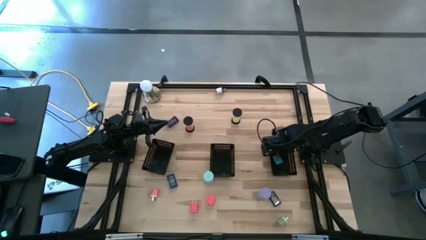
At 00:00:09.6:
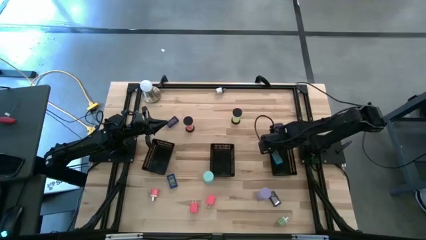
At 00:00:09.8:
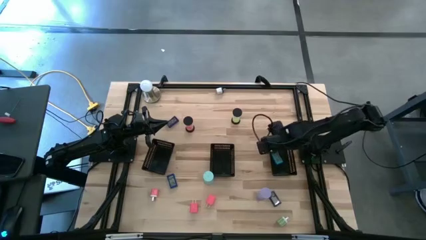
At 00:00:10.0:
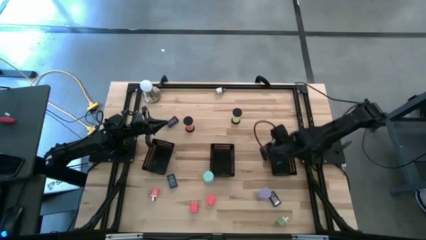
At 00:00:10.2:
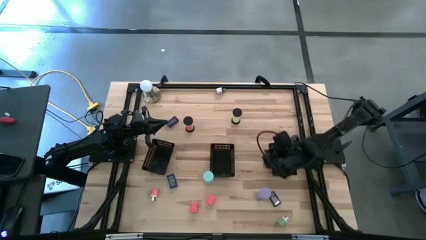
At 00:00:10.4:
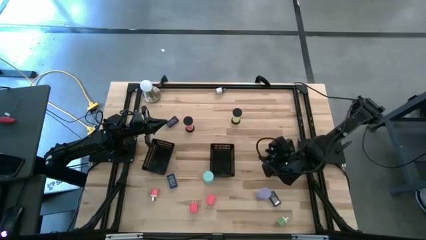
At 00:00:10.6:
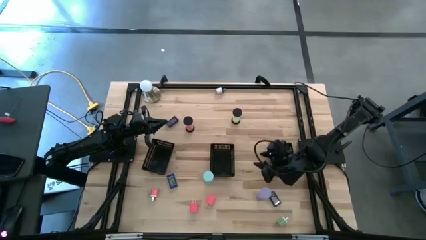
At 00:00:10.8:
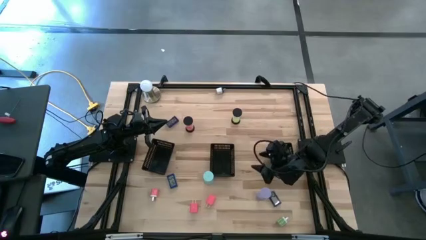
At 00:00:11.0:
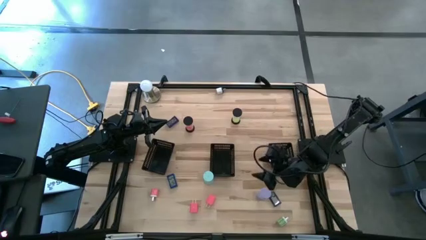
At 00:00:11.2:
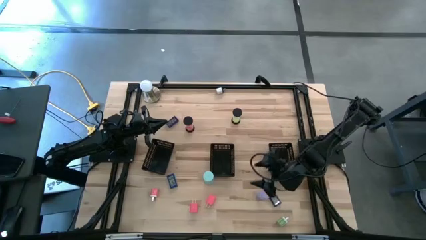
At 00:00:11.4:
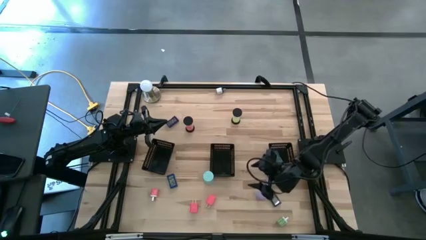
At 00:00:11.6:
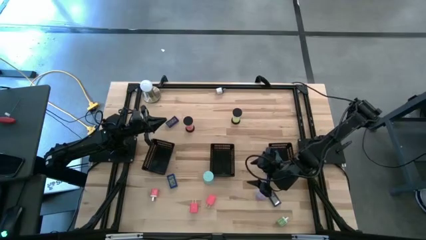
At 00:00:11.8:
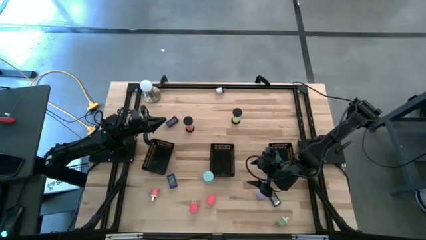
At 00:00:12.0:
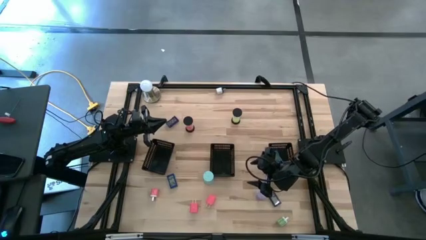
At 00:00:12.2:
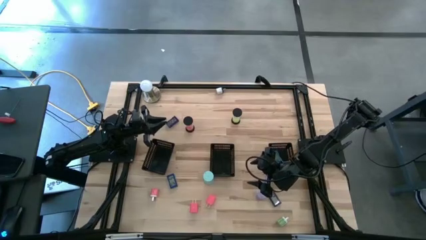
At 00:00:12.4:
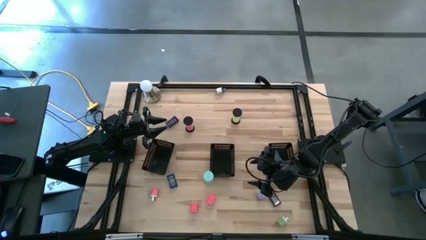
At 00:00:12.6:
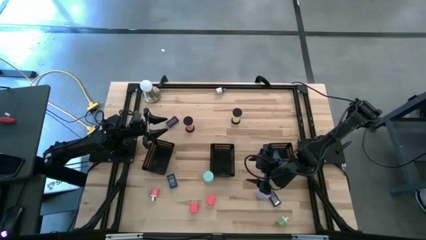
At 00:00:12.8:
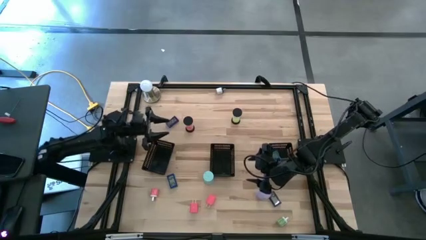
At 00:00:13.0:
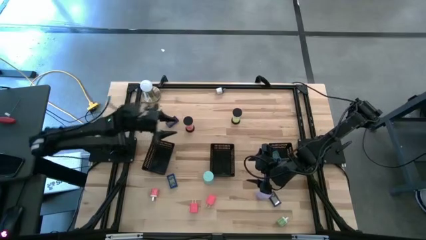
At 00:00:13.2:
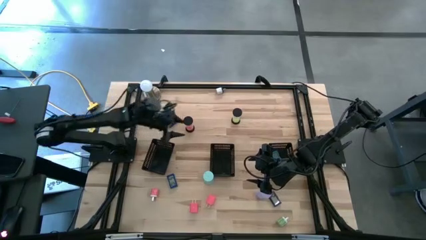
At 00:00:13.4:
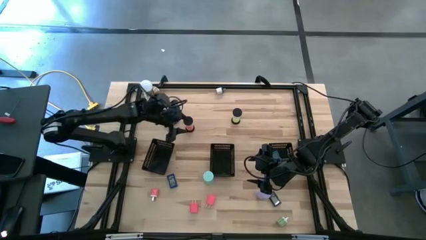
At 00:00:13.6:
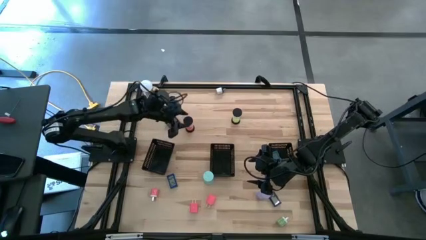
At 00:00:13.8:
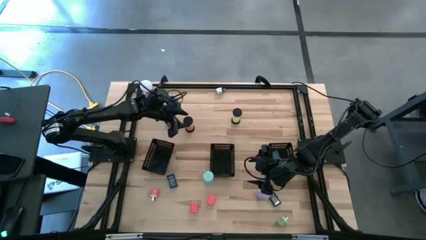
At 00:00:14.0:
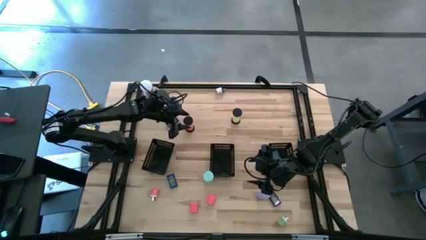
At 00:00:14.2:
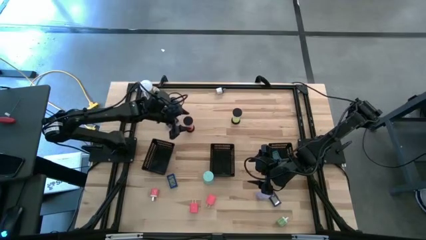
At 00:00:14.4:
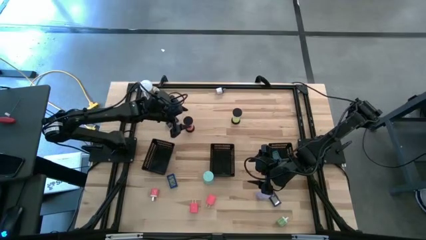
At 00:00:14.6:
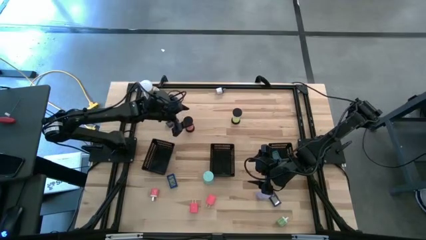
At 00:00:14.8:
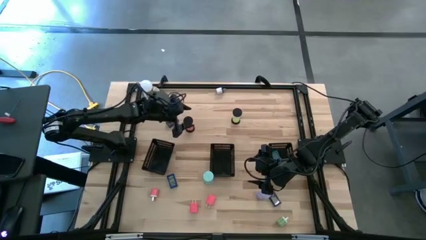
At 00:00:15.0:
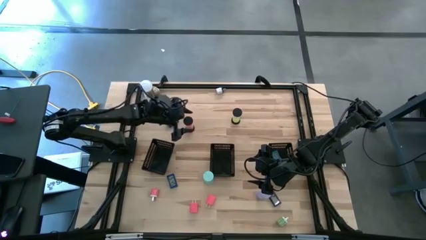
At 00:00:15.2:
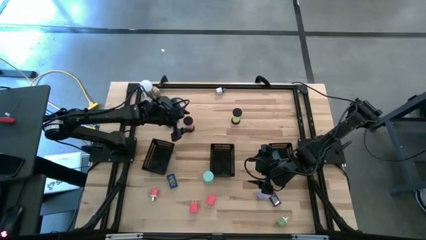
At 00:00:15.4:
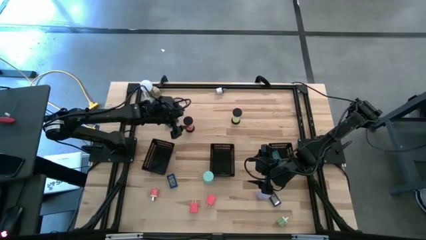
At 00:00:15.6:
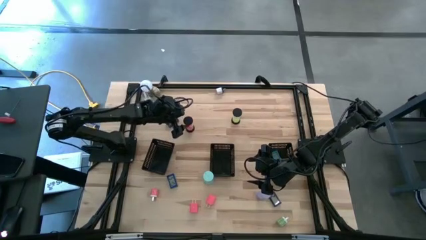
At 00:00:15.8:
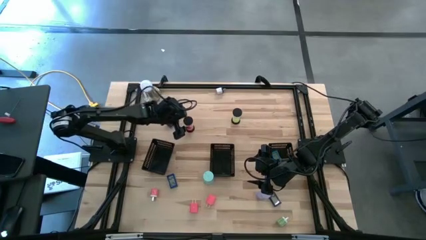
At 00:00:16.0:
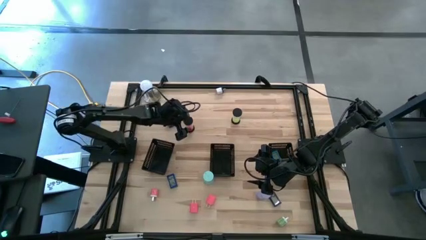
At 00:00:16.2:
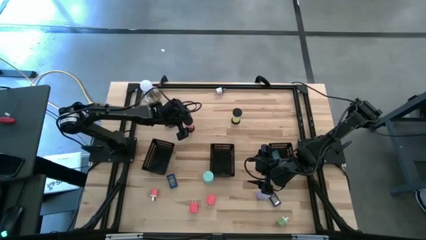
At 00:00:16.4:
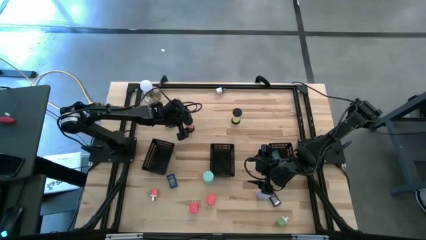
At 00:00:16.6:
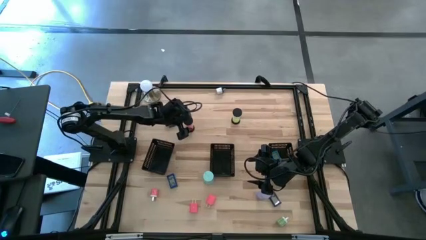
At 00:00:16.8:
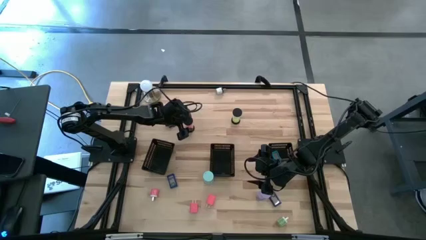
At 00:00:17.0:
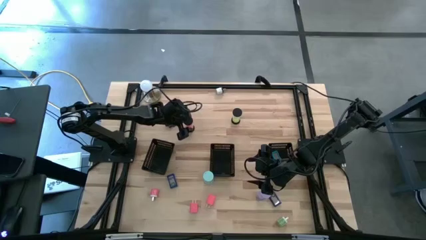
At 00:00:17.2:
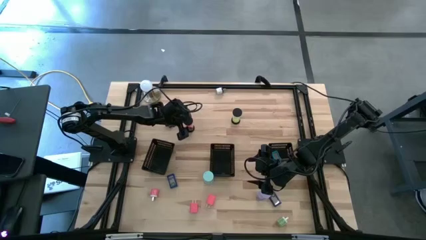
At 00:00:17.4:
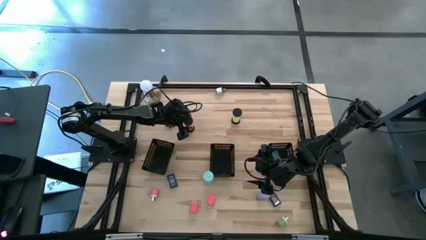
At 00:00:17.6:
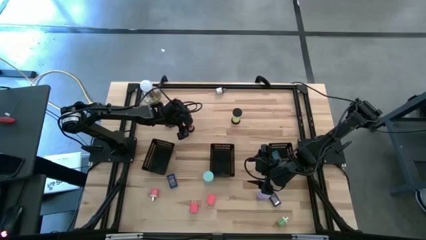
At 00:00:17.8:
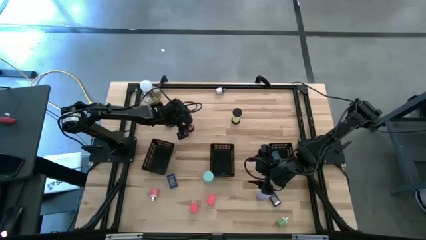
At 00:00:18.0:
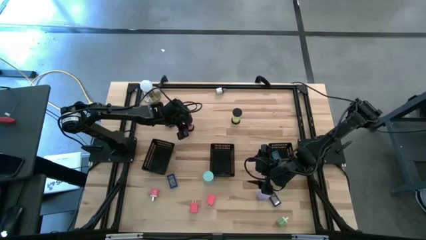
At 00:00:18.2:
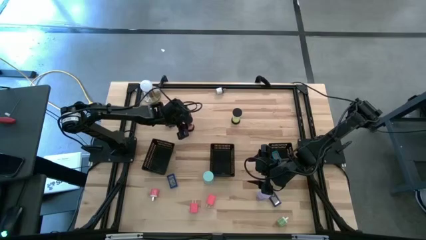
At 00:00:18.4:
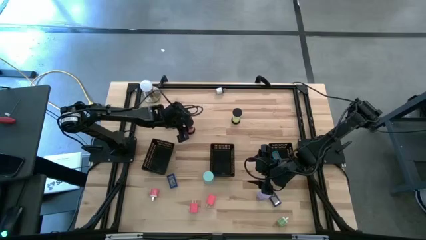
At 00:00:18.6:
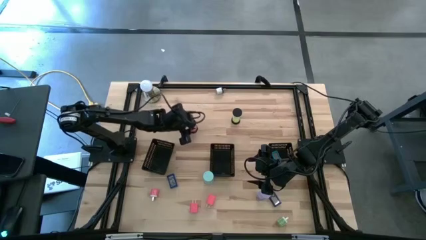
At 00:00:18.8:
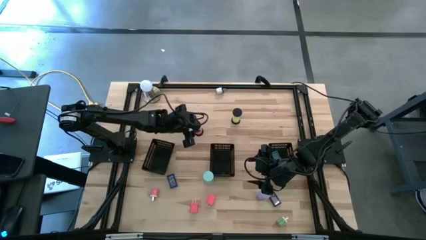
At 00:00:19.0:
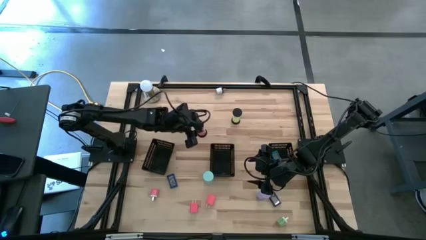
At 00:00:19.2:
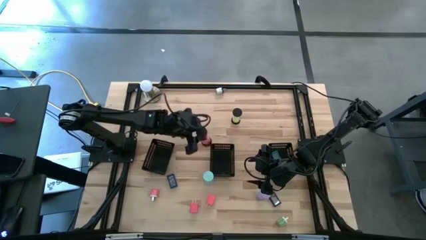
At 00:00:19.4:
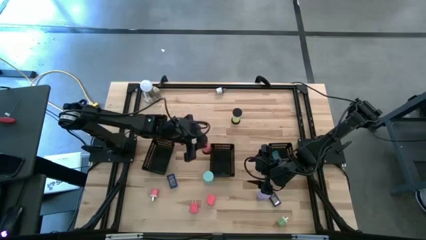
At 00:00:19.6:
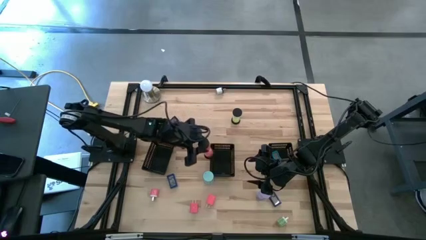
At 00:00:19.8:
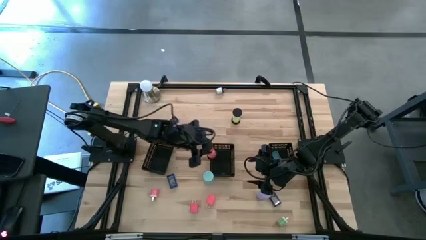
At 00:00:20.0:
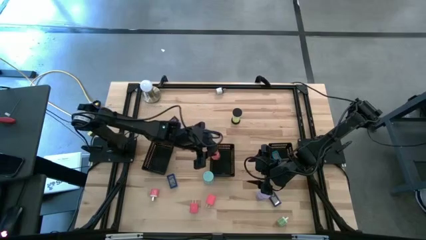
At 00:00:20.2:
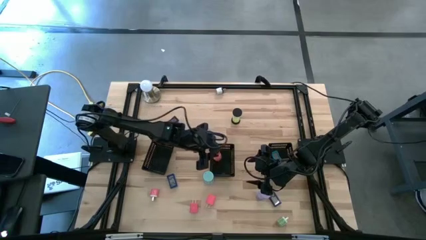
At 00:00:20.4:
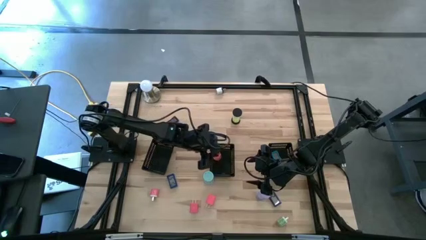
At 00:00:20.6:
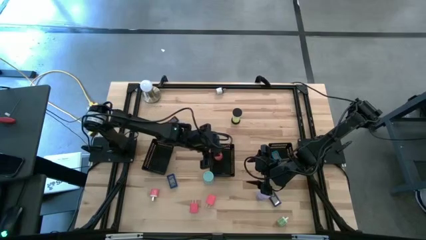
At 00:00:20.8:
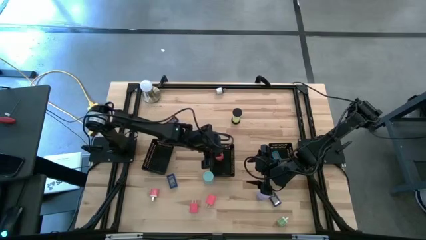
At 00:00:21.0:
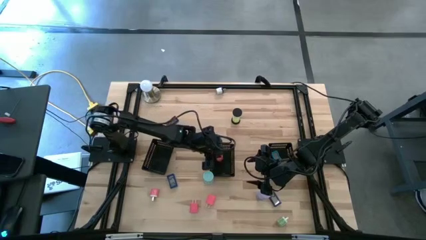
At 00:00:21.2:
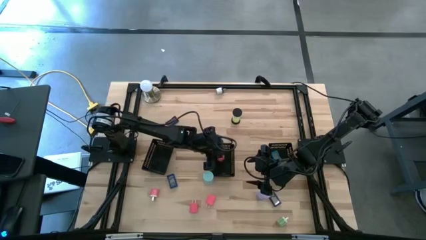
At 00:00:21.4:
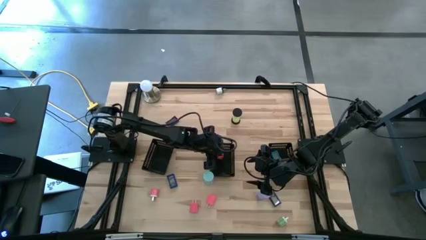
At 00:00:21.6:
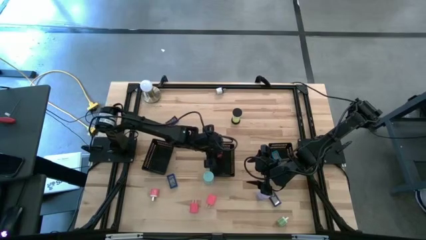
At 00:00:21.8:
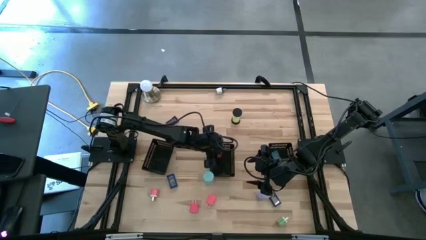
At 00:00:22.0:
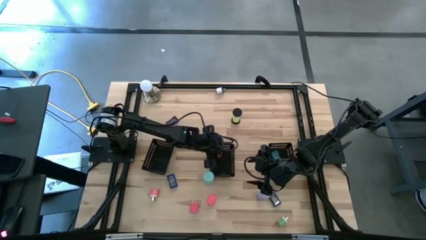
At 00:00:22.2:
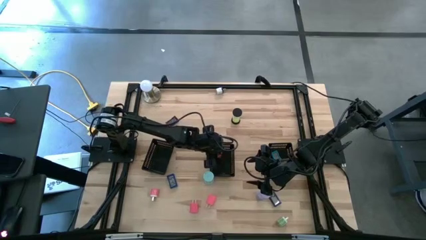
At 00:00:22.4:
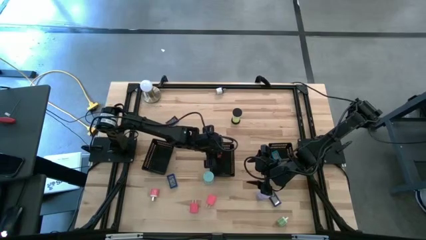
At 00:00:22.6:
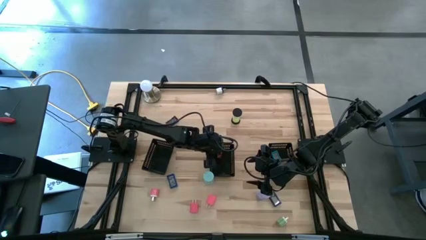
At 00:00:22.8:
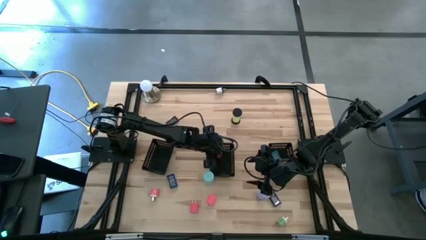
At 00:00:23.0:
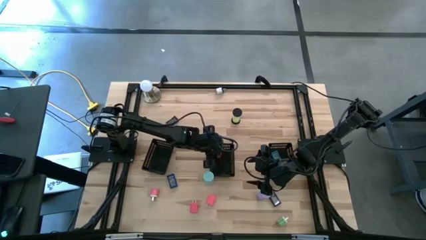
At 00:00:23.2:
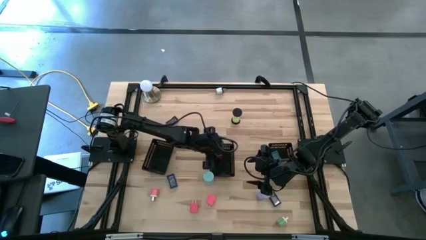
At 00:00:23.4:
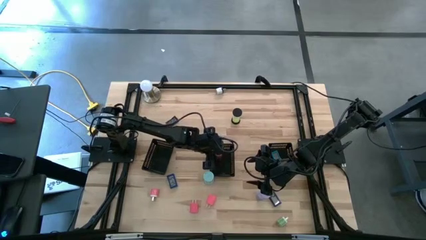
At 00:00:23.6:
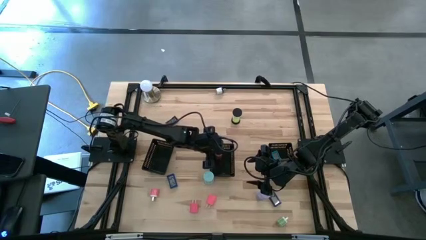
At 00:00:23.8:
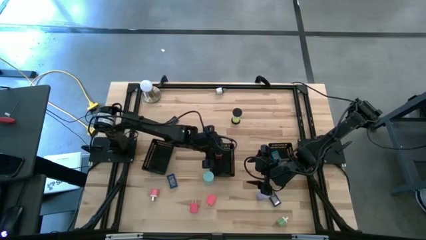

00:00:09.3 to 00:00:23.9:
Task: Pick & Place Office items
Put the pink hourglass into the middle black bin
